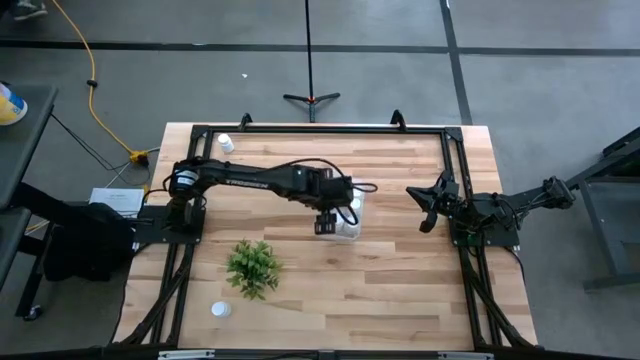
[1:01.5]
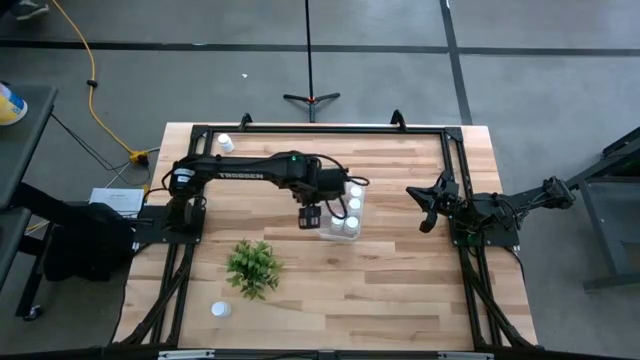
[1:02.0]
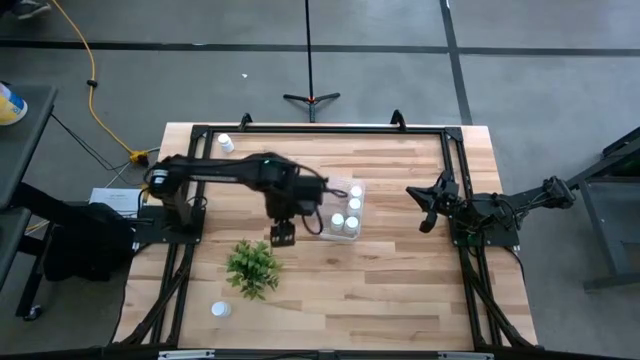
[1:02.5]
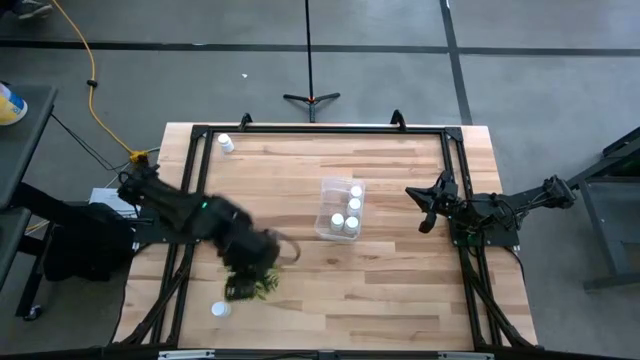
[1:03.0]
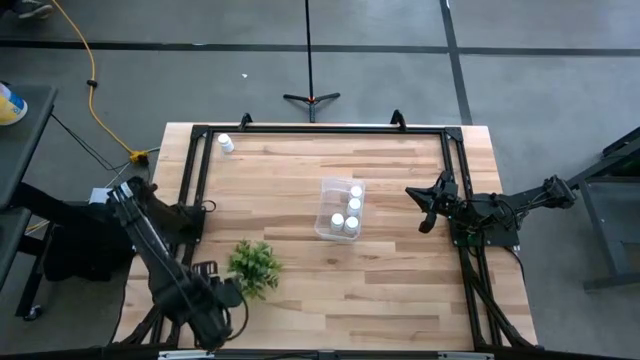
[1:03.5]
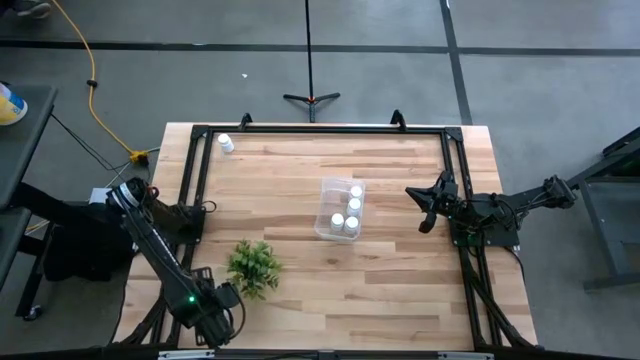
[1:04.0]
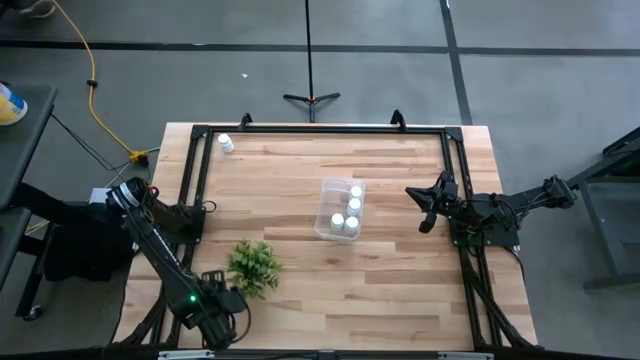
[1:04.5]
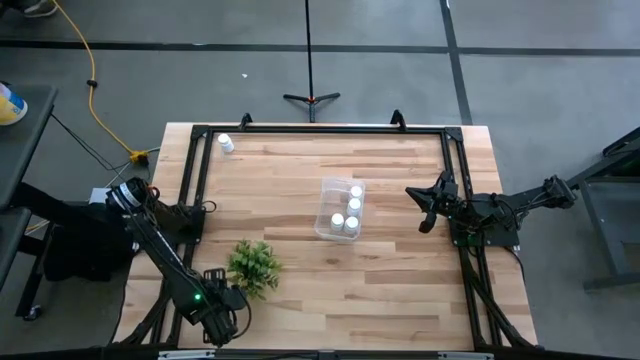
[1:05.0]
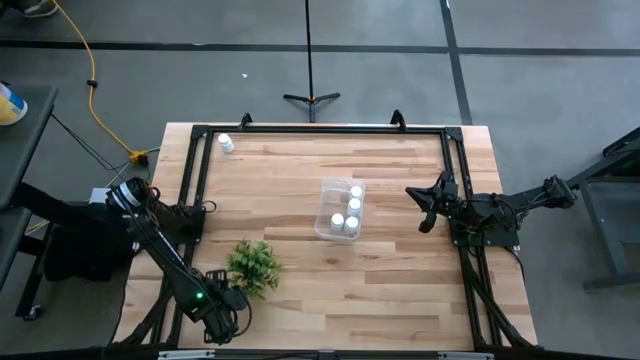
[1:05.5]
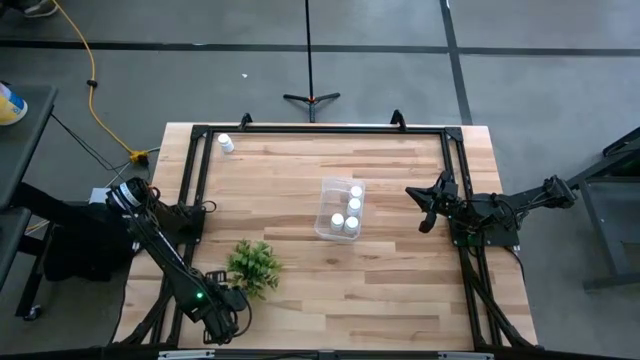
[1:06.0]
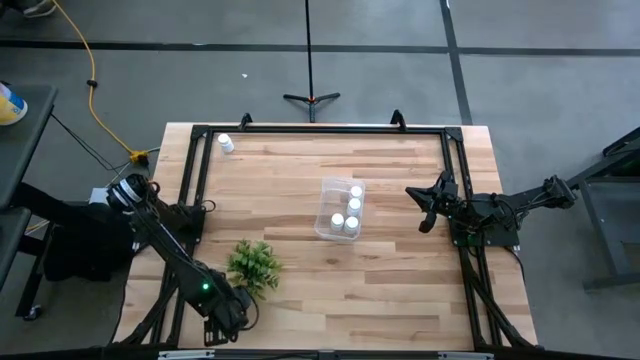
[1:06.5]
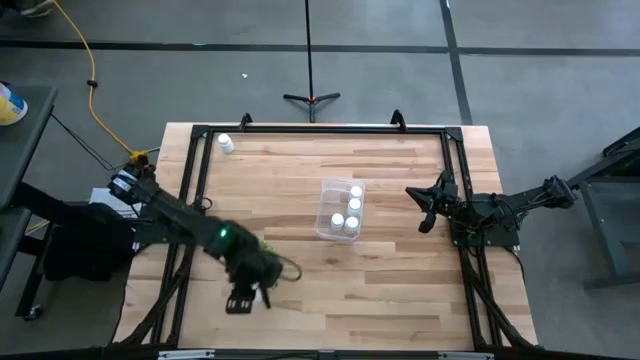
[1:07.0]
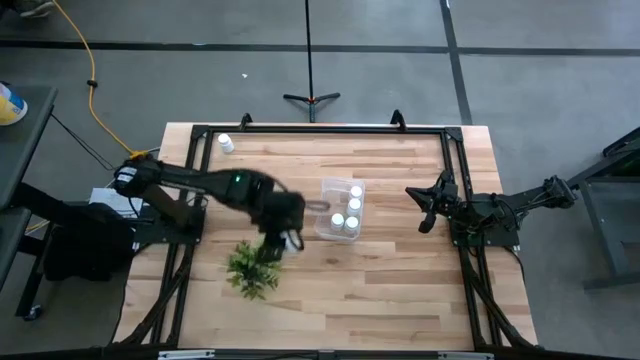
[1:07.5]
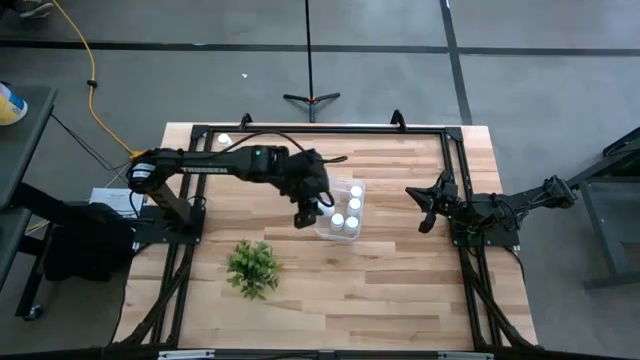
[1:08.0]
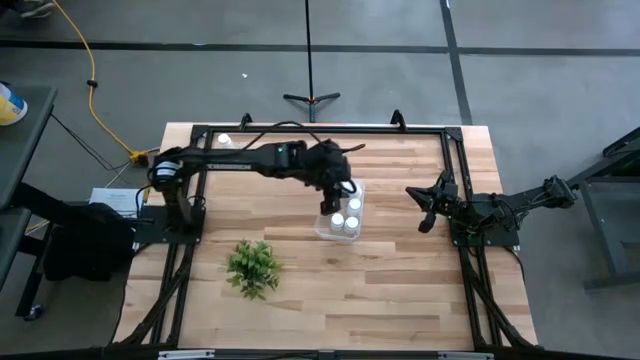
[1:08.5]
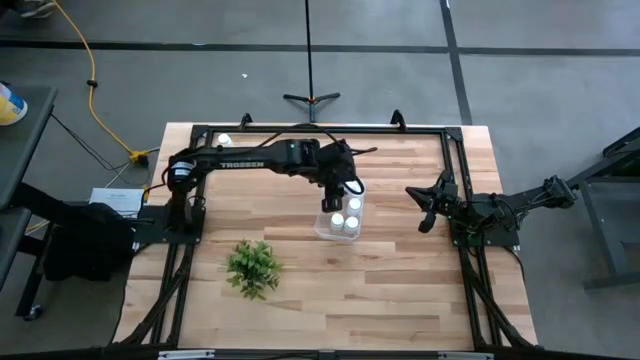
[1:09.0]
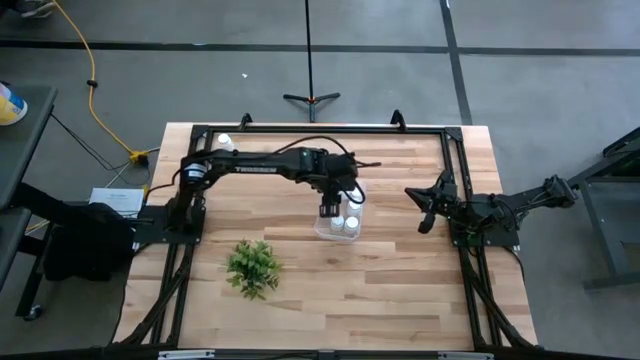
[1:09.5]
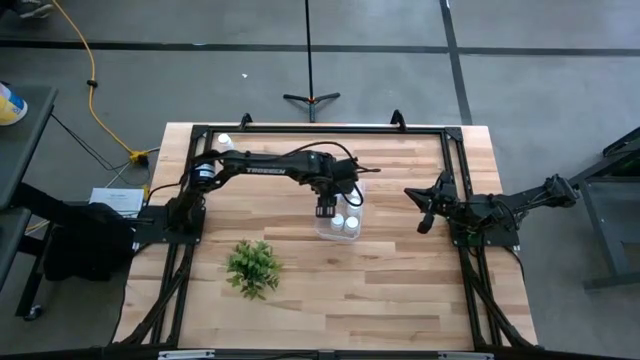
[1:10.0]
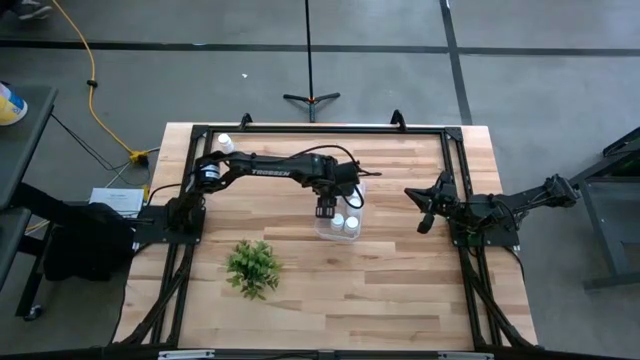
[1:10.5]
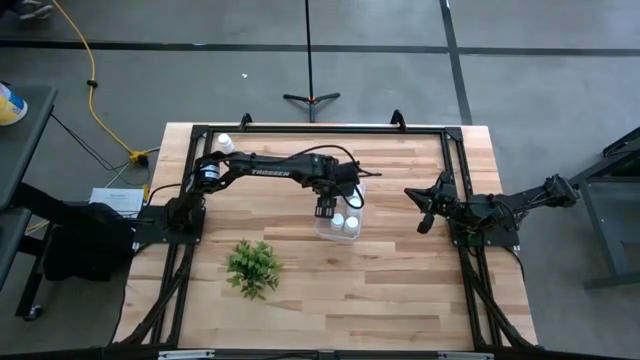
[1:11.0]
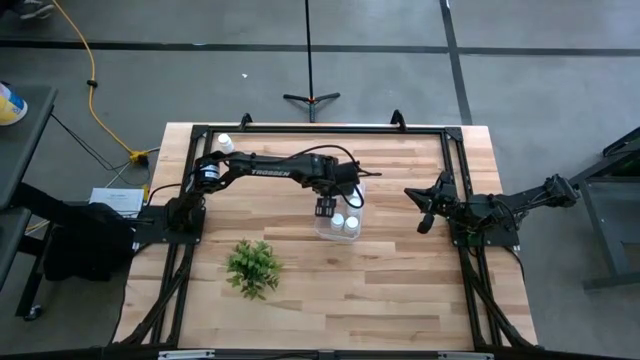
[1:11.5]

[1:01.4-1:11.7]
Task: Pick and place pill bottles into a basket
Put the white medicine bottle into the transparent bin

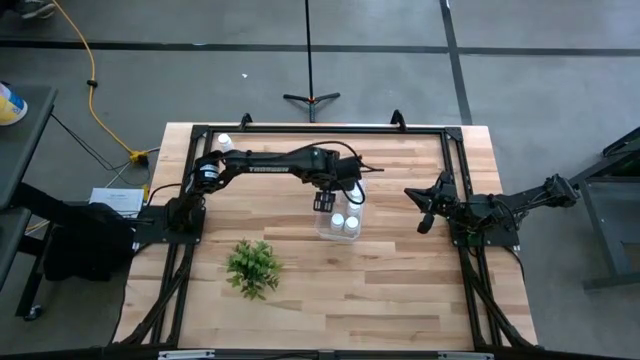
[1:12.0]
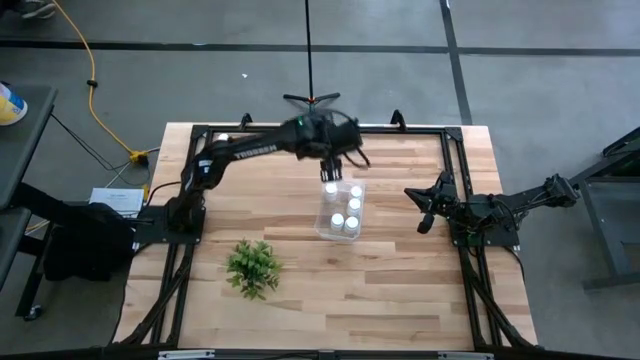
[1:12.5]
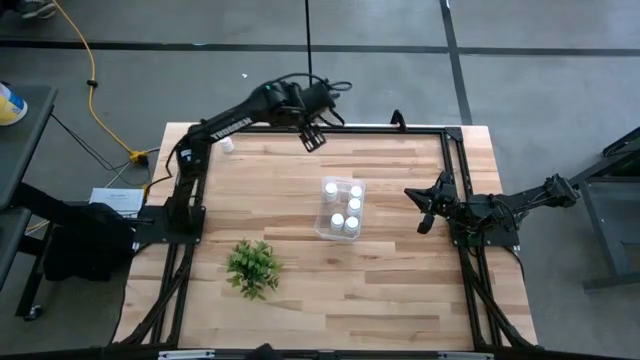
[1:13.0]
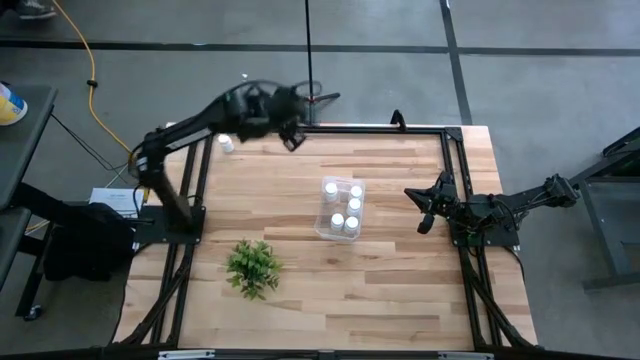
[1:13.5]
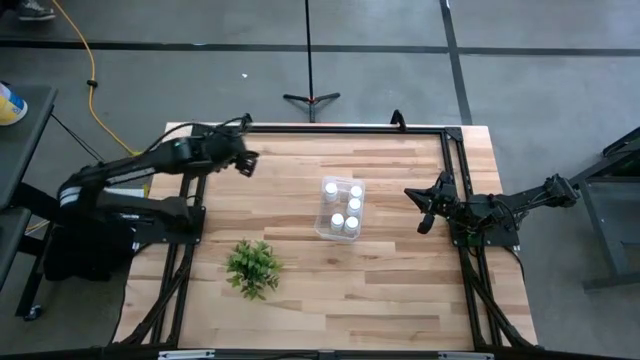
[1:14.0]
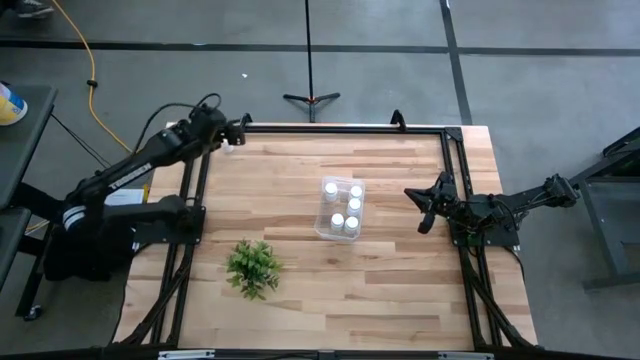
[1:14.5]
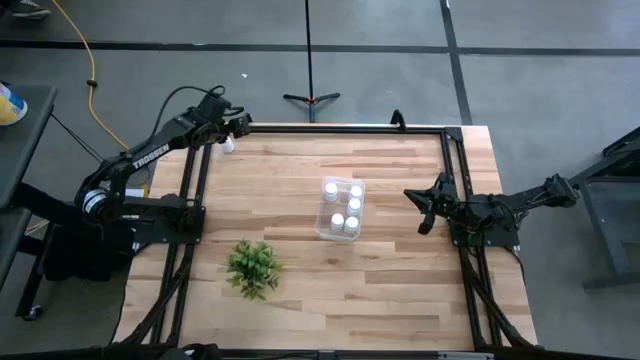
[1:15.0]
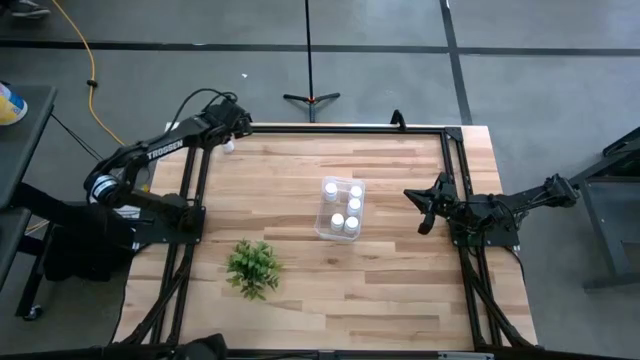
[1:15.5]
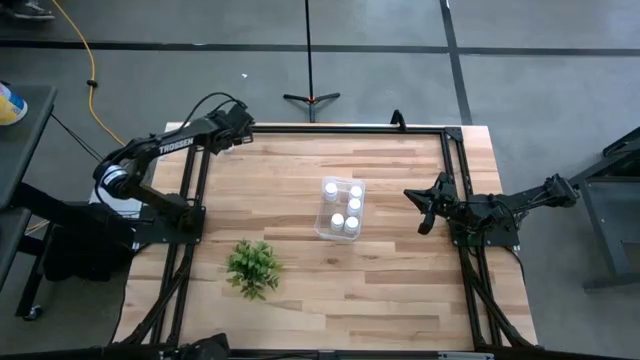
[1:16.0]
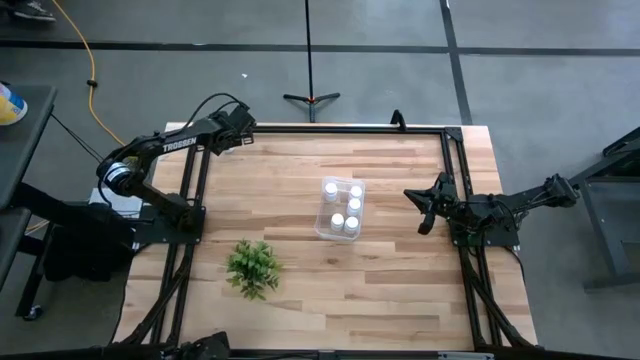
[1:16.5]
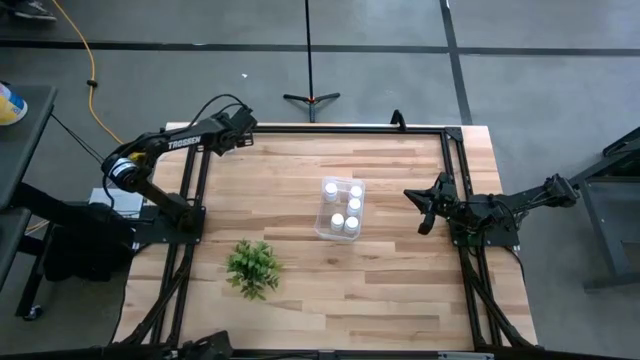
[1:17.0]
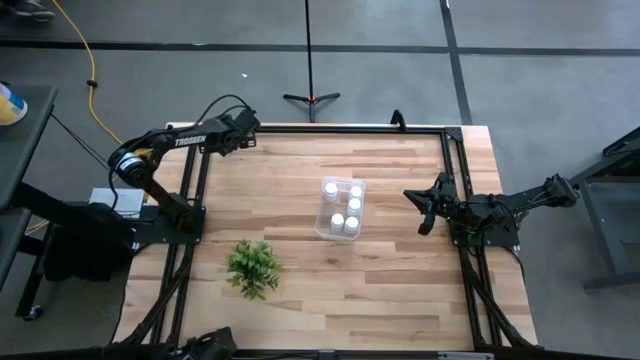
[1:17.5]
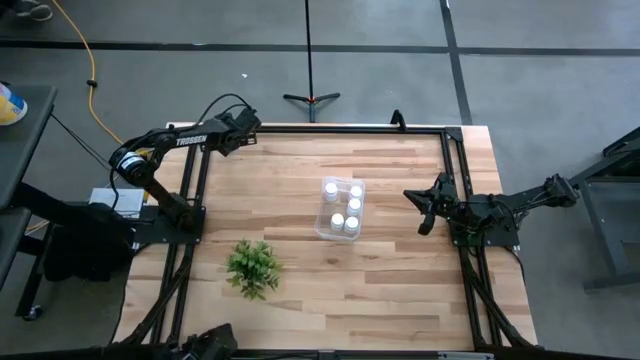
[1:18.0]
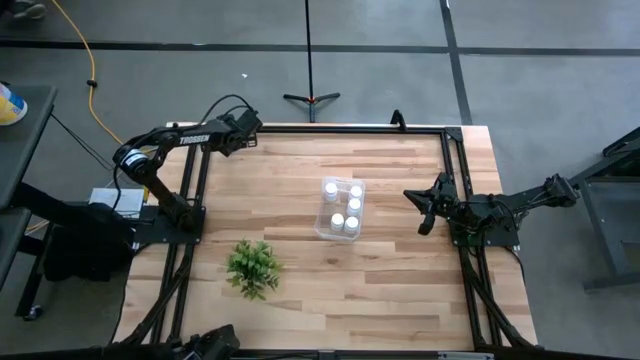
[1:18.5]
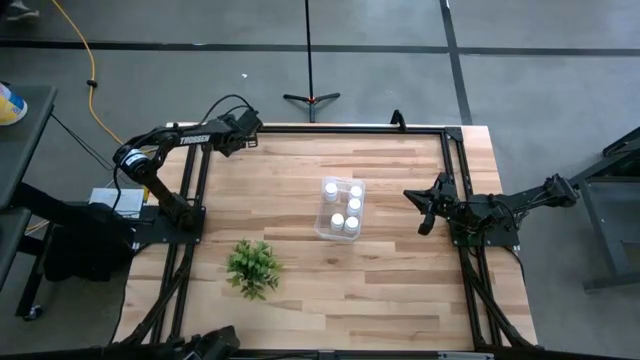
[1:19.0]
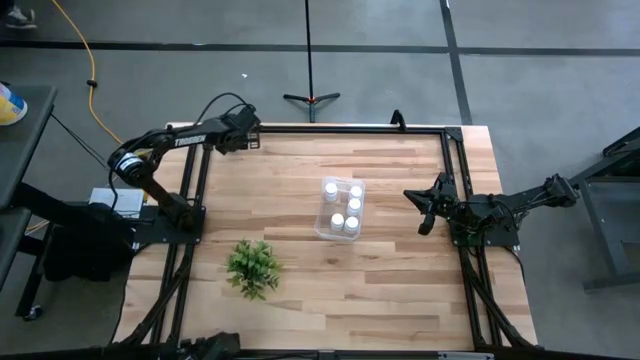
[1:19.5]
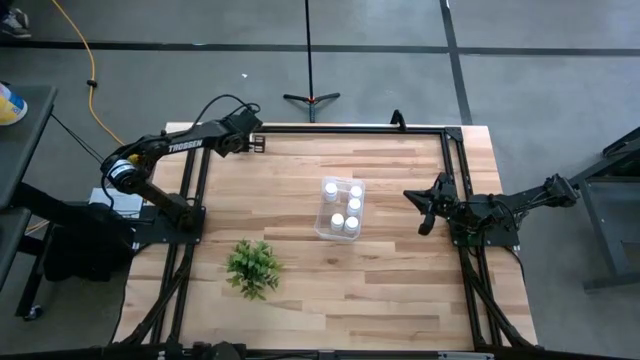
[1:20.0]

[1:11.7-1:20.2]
Put the white medicine bottle into the transparent bin

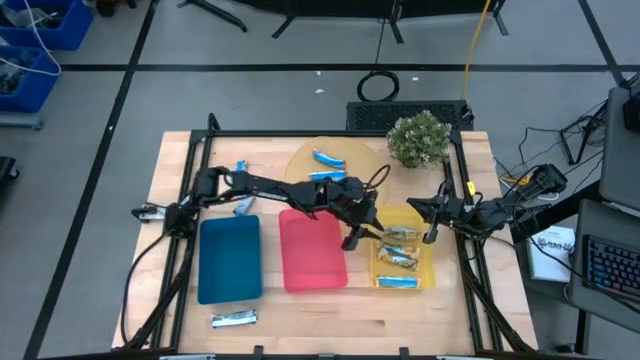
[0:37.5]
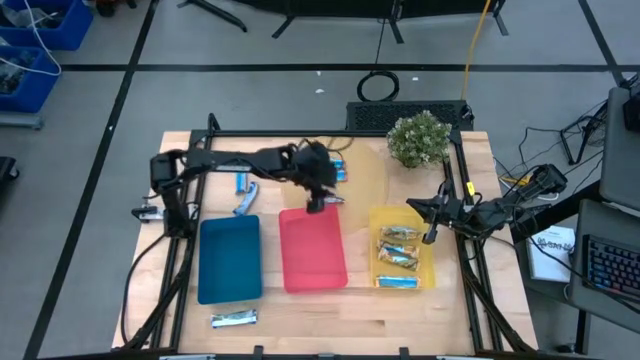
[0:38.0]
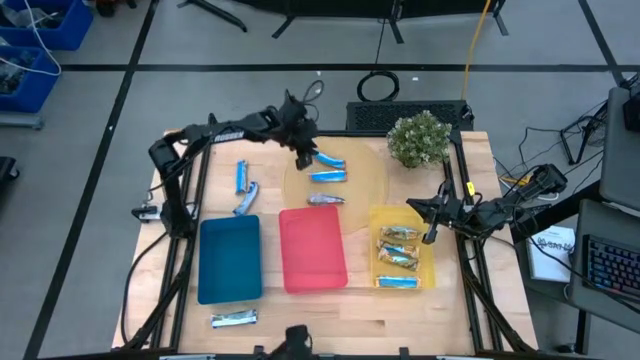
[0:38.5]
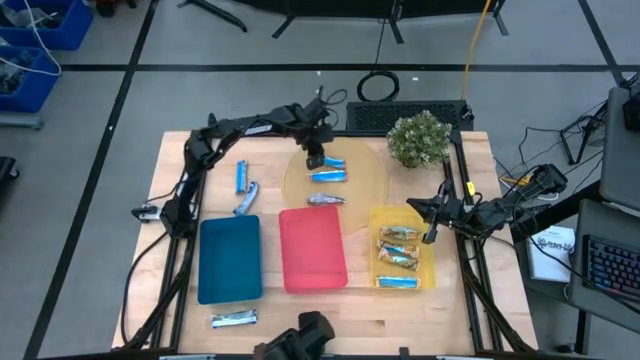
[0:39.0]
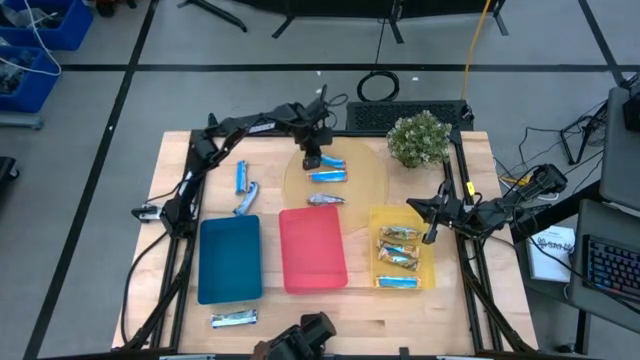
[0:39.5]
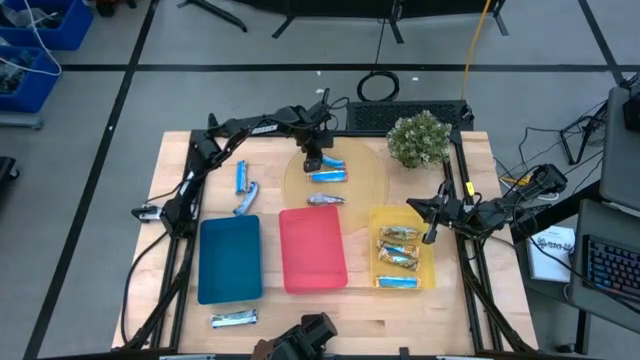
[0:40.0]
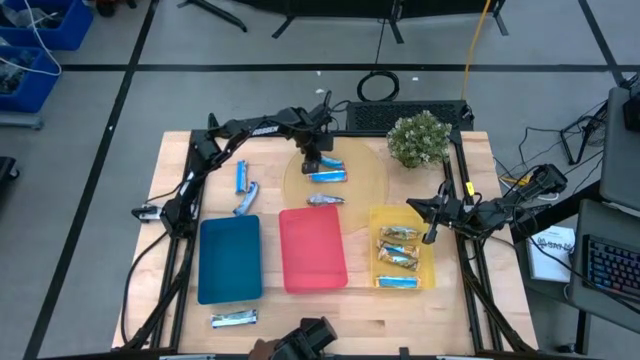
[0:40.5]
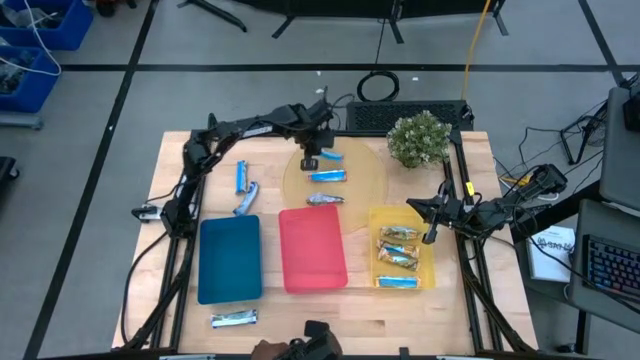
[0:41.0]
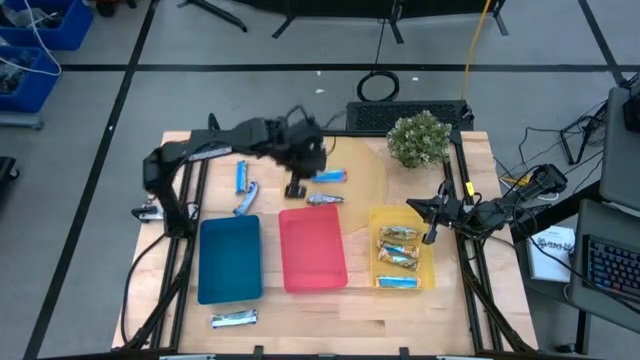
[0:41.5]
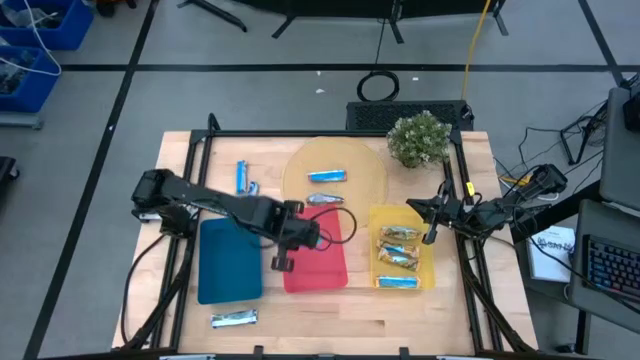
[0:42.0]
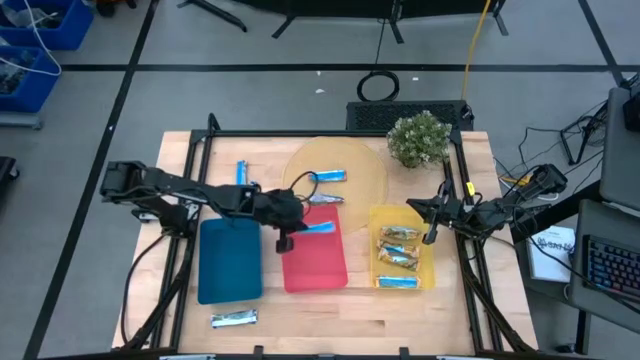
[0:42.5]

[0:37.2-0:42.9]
Task: Pick and place Granola Bars by type
Put the top red granola bar into the red bin
